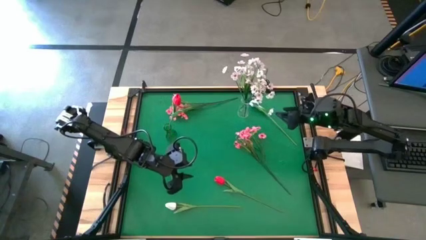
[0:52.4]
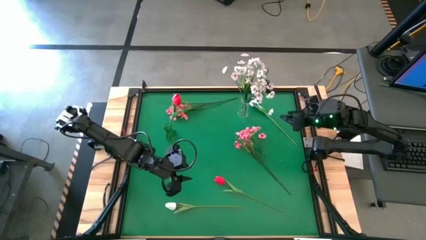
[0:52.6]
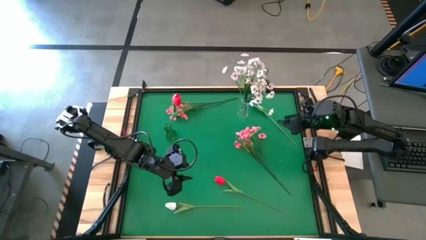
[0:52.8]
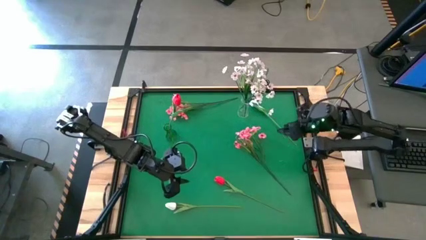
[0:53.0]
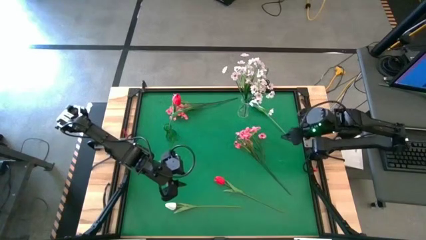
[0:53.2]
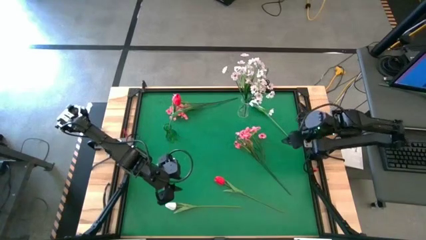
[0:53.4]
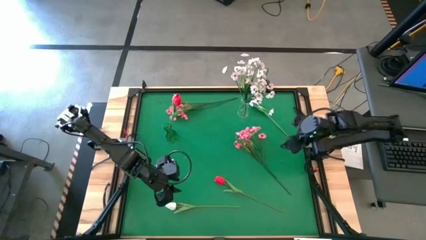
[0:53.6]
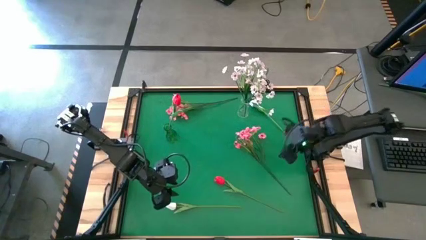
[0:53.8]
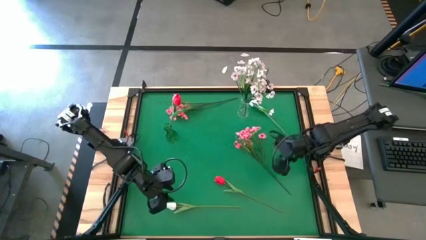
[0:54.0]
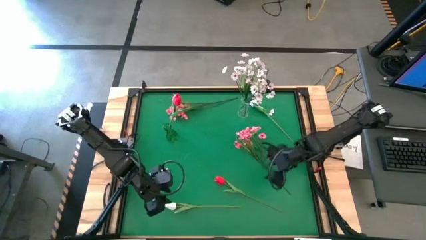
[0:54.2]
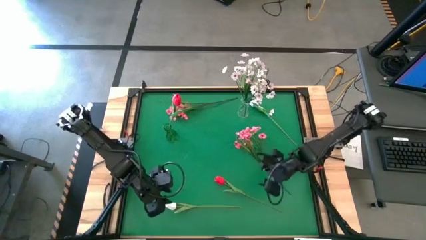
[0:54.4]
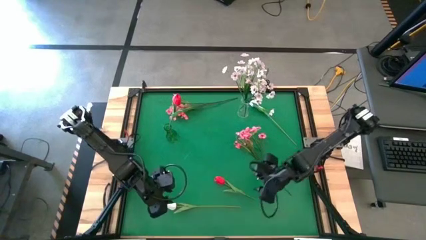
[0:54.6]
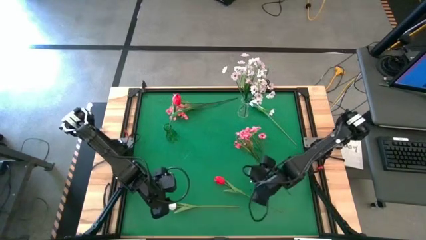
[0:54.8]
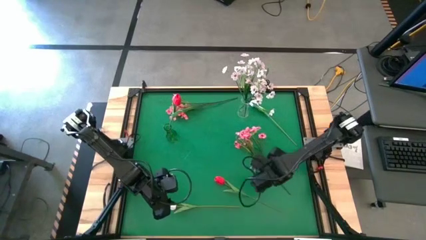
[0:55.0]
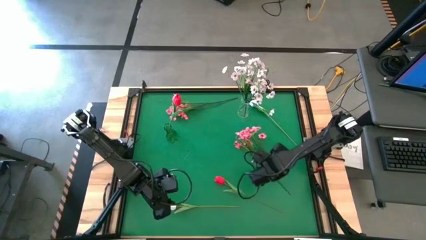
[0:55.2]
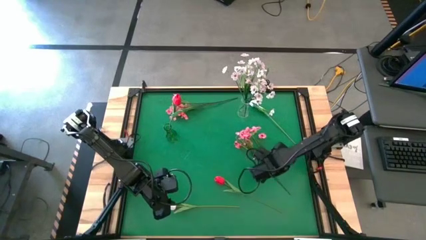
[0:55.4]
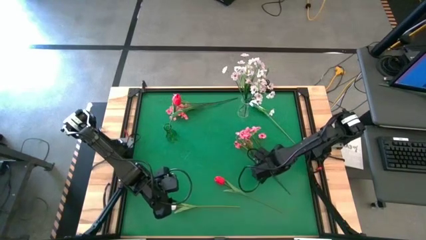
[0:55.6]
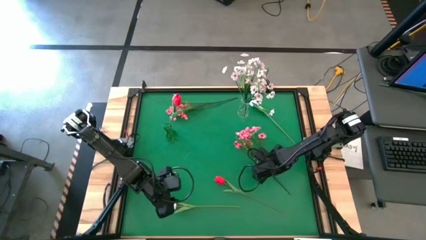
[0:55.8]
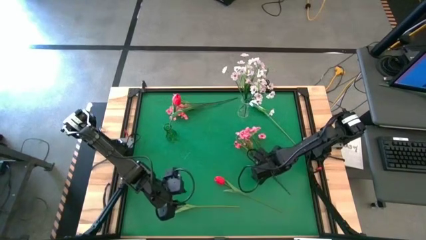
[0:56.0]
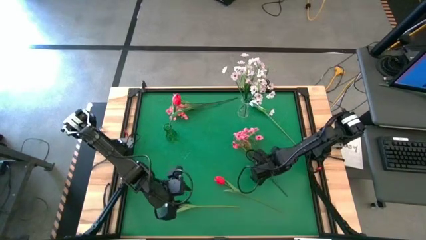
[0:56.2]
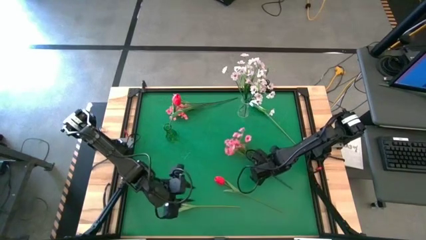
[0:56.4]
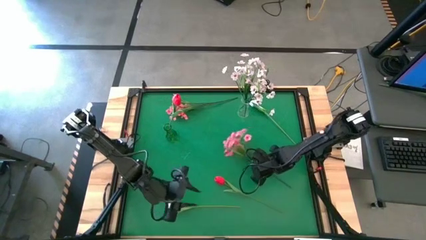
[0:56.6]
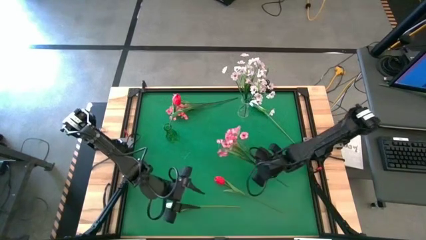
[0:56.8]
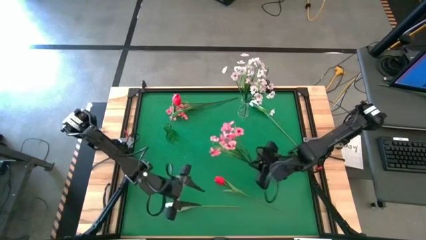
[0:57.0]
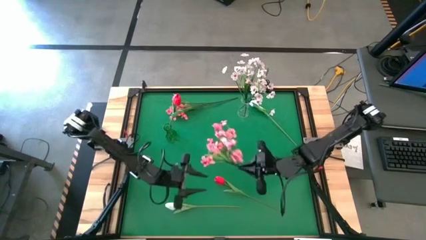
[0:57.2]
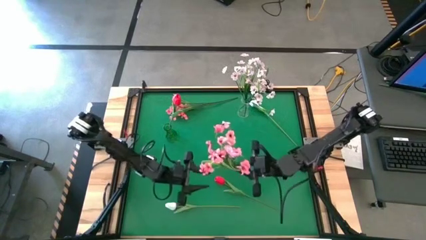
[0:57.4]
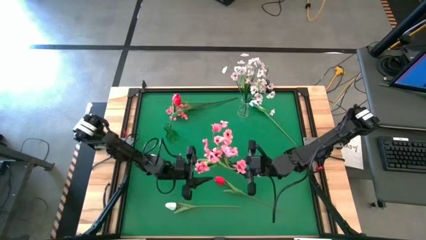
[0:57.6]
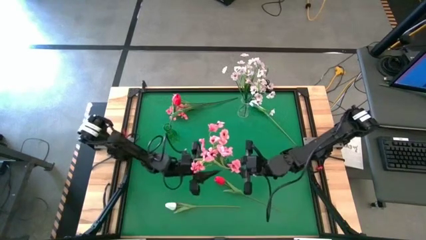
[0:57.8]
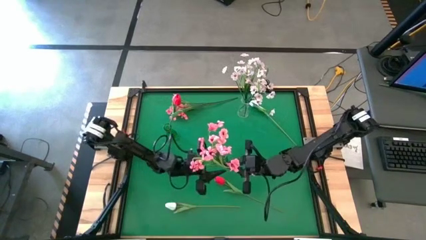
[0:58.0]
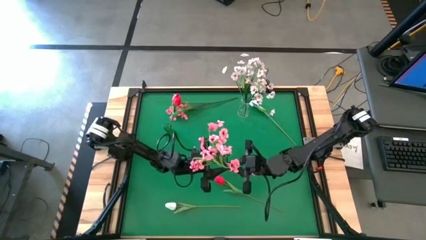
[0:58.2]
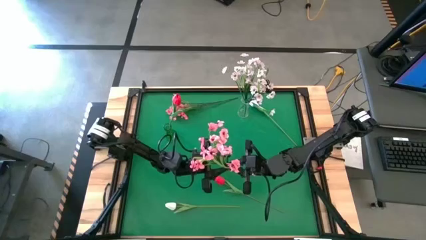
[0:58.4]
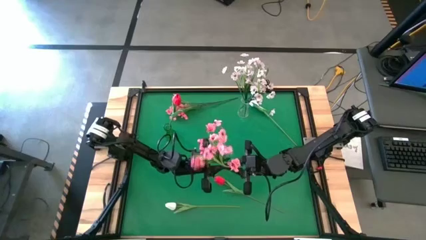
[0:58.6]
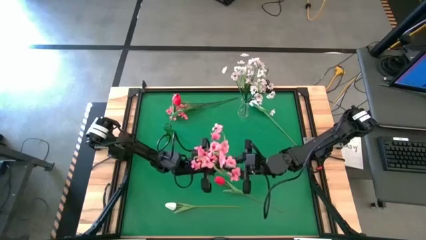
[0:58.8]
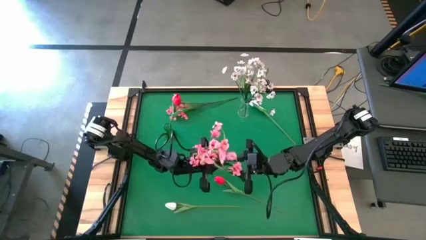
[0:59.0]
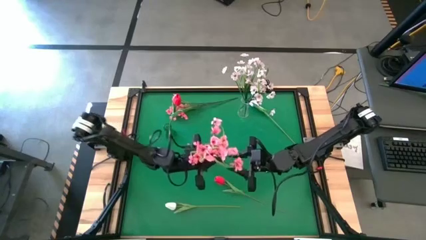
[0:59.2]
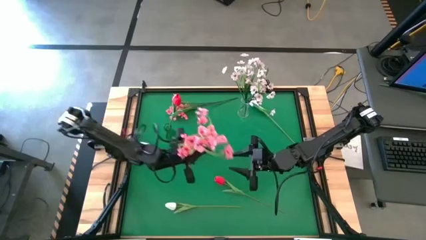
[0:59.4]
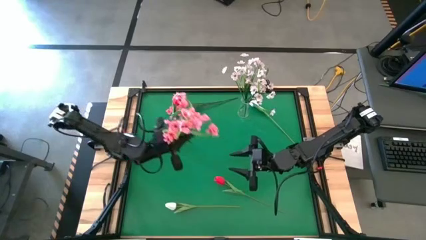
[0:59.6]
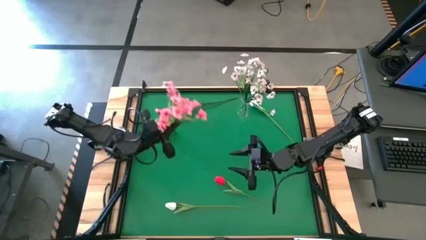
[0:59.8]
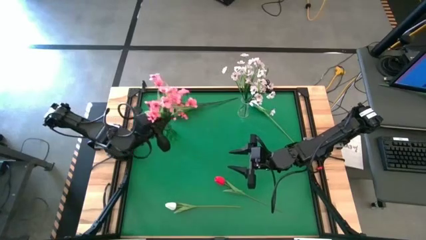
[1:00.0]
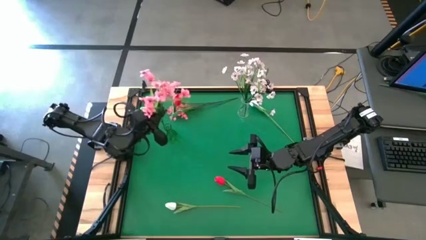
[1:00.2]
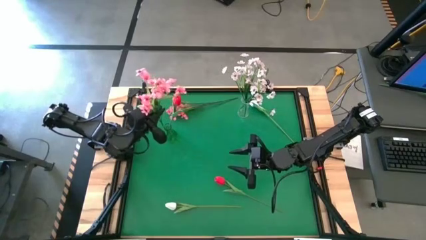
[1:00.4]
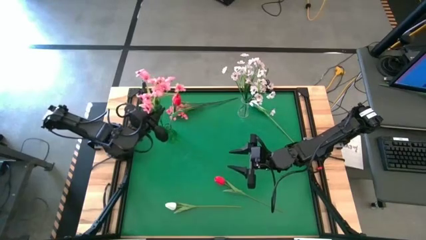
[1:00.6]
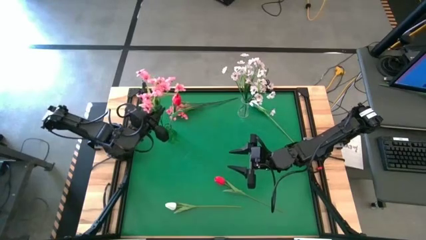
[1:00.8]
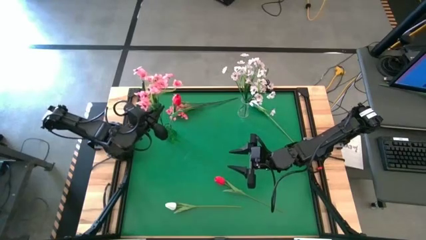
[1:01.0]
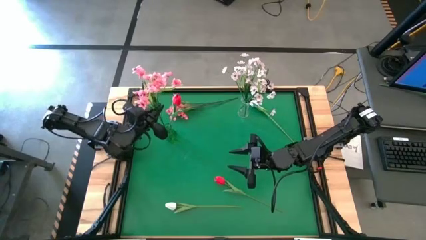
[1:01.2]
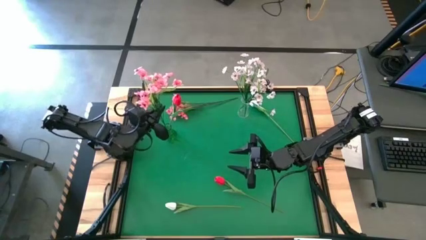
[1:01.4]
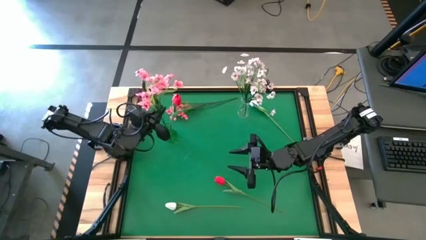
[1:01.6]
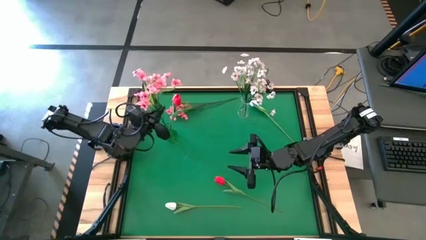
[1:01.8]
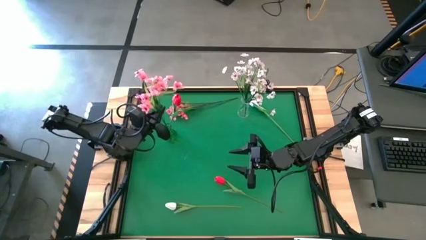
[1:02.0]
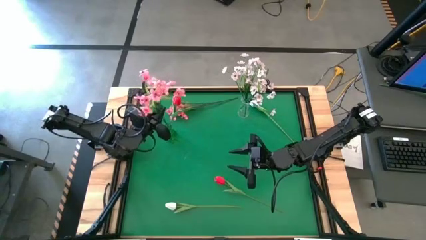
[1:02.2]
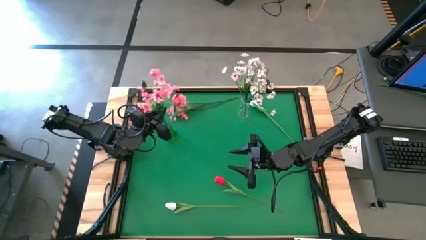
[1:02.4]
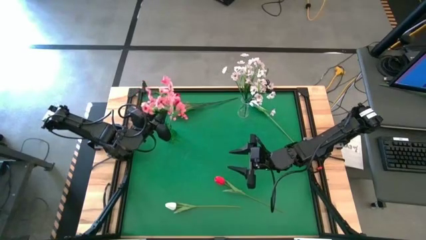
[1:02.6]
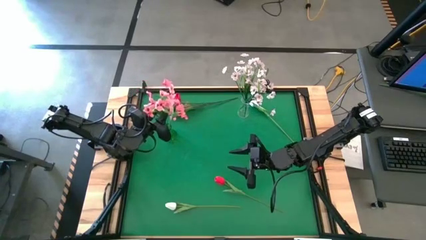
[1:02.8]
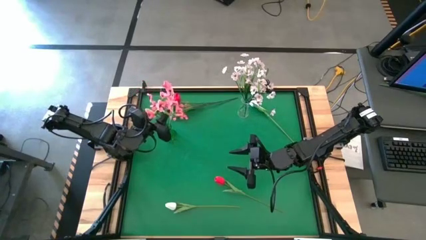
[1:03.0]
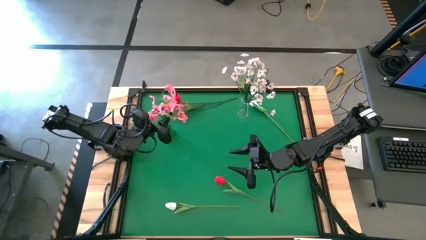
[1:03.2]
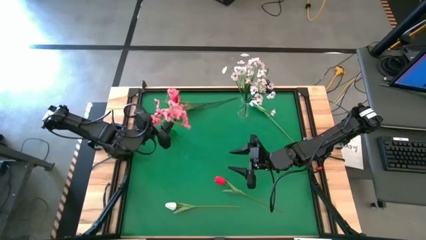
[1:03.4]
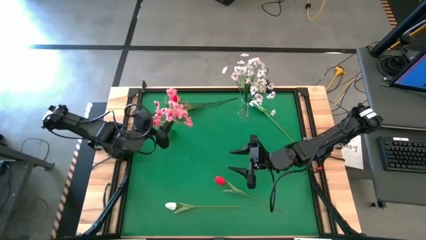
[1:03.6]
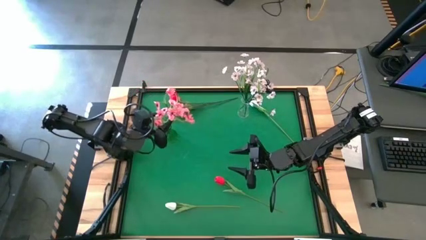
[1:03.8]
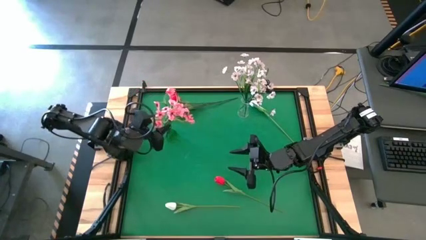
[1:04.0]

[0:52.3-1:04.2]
Task: Sort flowers into vase by color
Put the bottom pink flowers into the green vase
